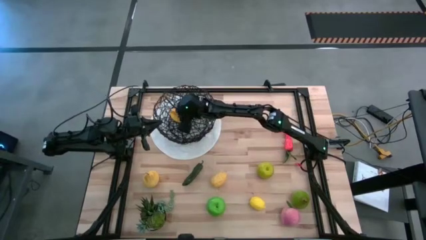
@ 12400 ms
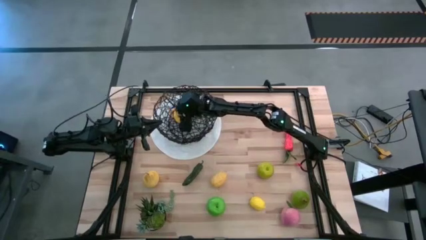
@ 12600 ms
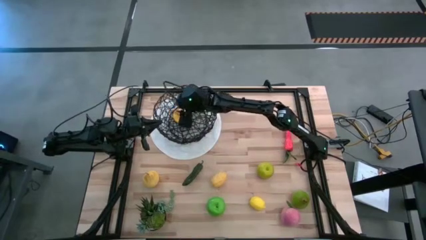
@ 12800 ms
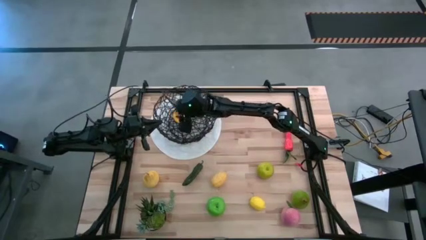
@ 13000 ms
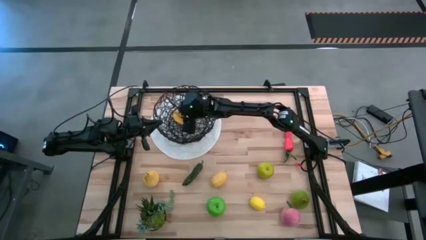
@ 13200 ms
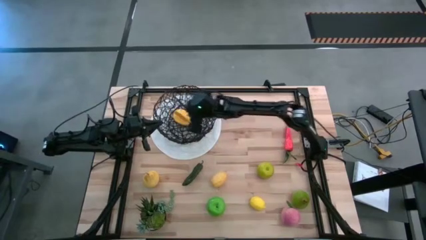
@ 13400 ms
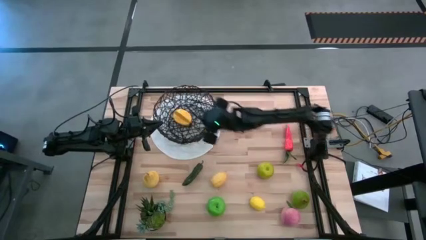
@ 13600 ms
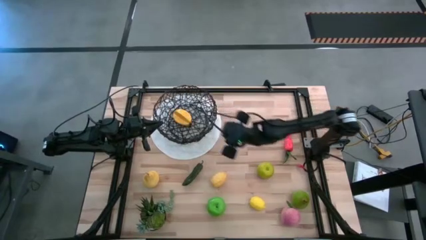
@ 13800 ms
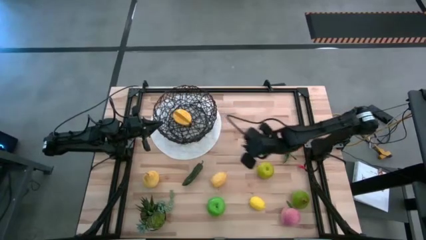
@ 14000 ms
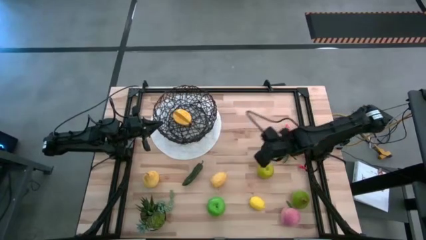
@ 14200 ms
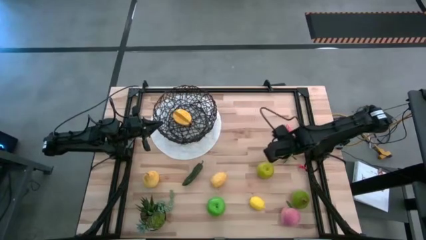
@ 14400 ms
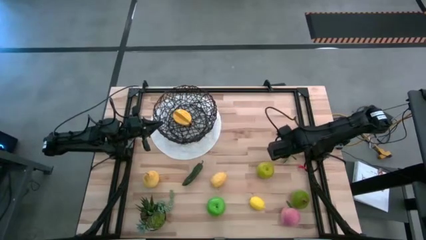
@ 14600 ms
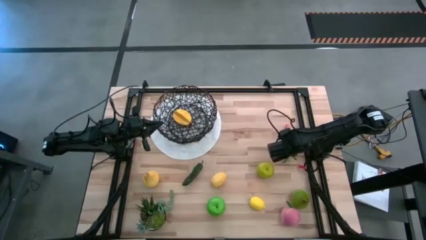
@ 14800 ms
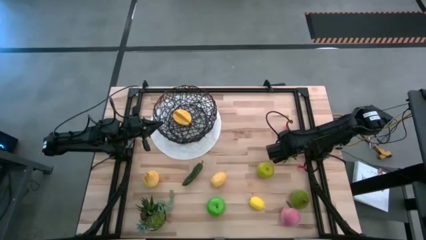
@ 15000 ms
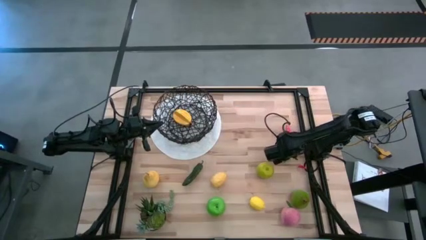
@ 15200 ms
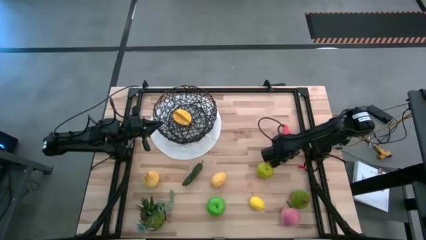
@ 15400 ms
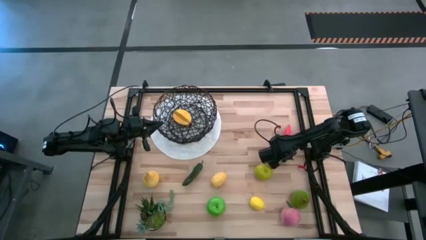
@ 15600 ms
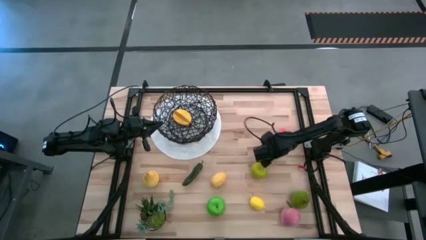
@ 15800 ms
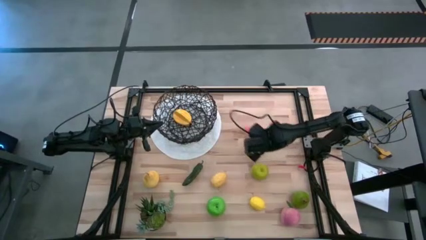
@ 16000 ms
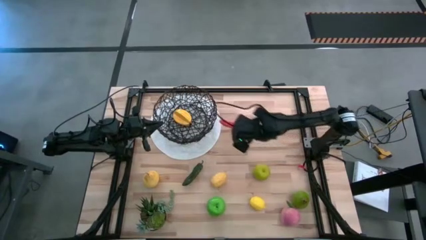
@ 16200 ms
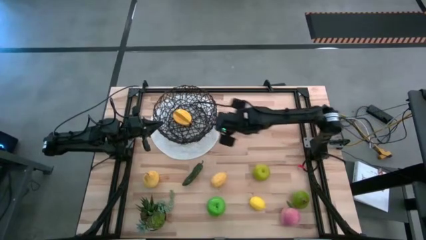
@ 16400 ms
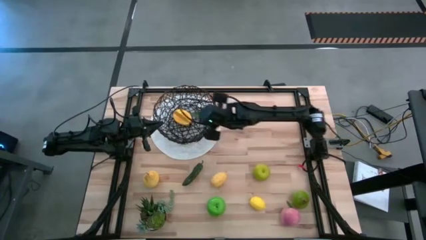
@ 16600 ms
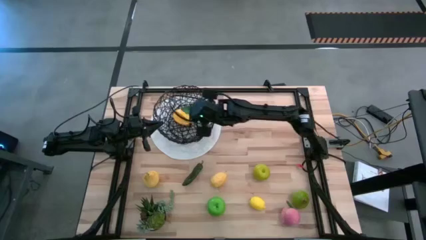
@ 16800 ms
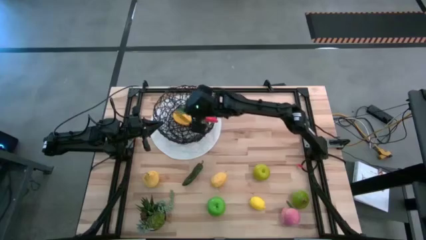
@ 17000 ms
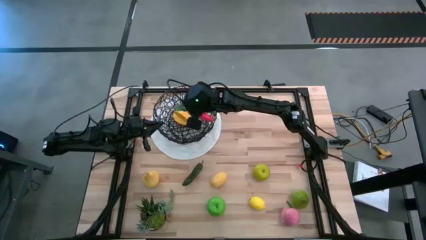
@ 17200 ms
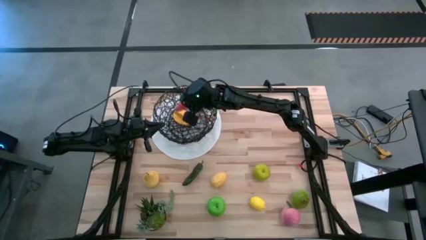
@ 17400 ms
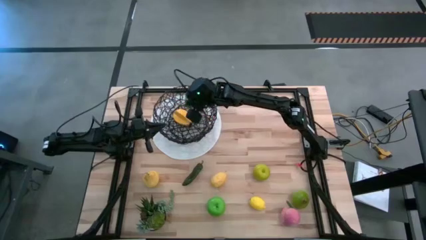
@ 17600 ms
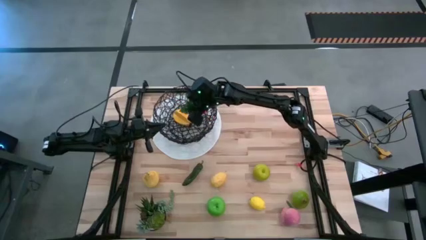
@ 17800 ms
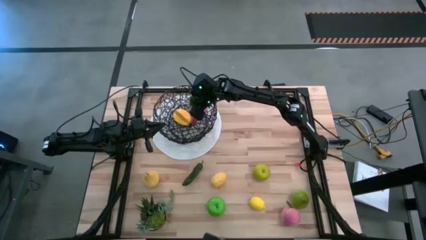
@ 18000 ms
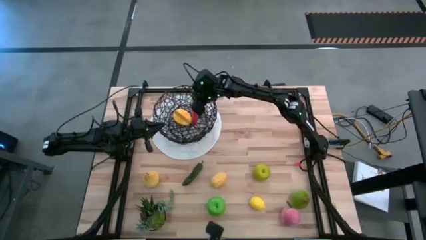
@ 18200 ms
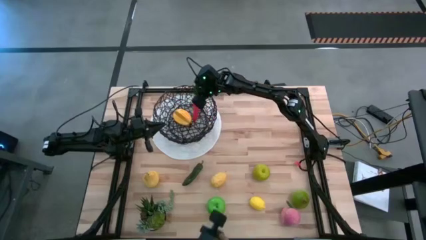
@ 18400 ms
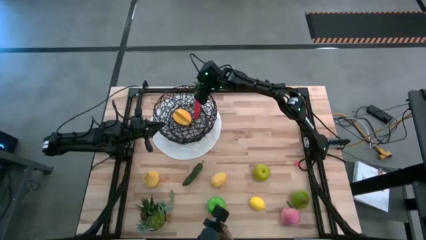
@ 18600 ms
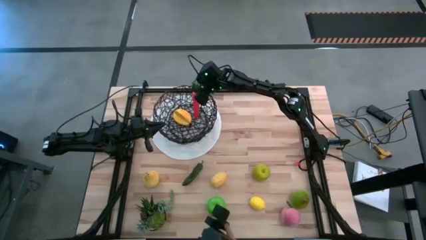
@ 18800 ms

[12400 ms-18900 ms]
Task: Build produce basket
Put the carrot into the wire basket

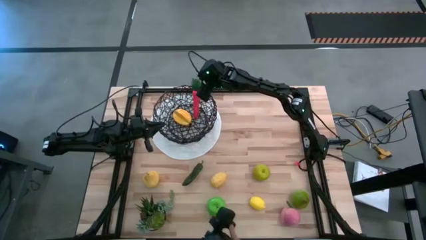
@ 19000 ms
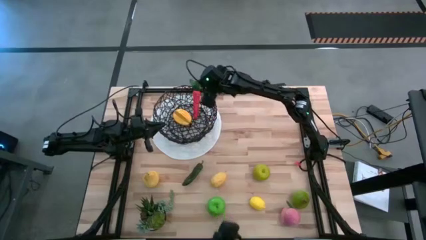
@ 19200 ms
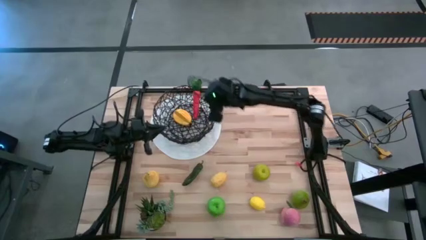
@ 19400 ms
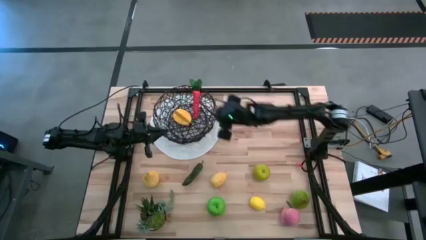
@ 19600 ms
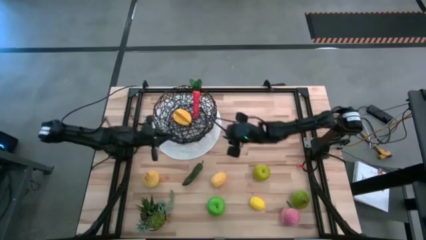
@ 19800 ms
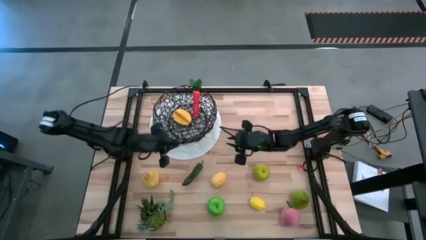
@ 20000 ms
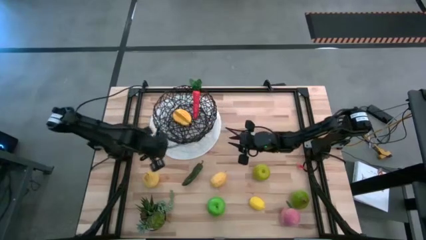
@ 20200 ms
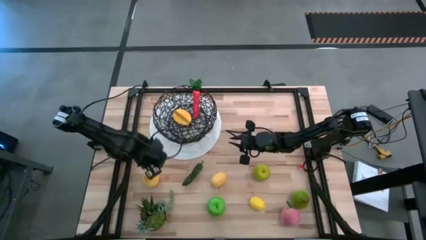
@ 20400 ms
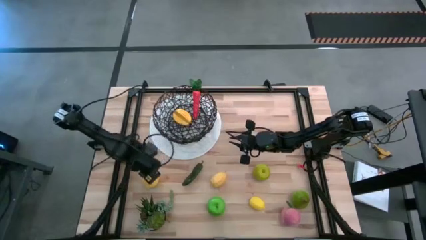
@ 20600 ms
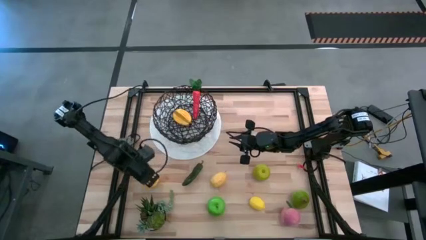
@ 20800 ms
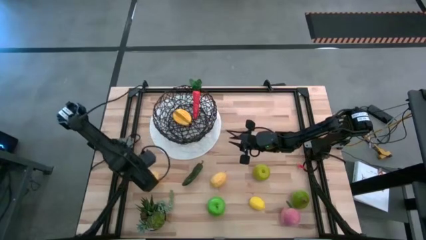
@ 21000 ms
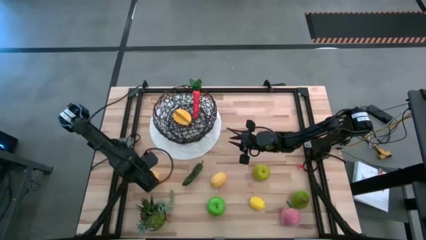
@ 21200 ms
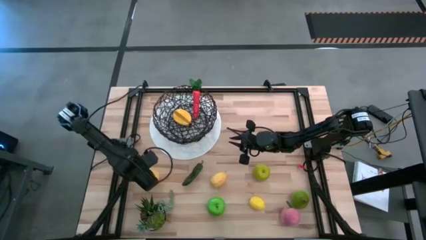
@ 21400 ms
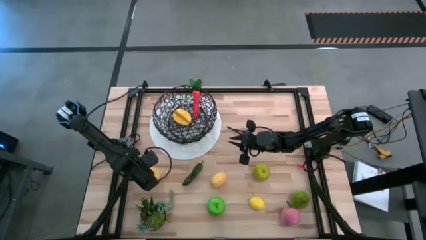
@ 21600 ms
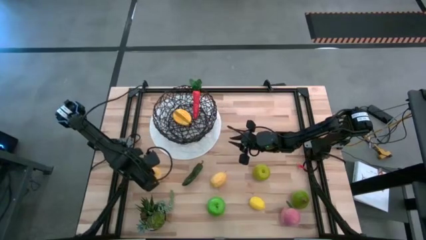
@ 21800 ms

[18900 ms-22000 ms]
Put the yellow pear into the wire basket

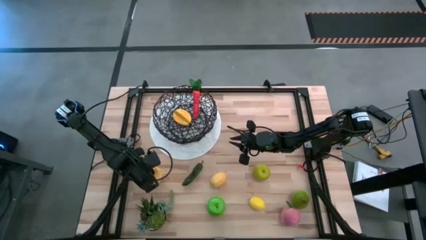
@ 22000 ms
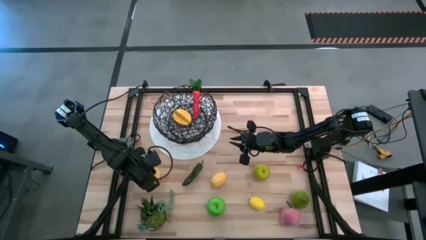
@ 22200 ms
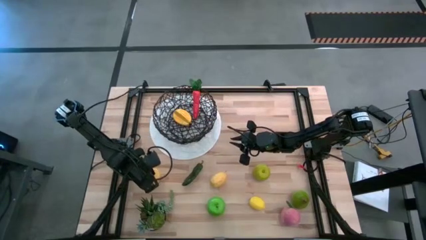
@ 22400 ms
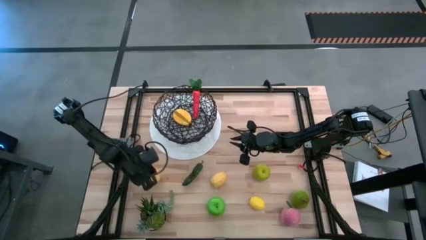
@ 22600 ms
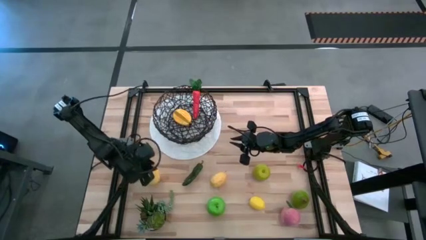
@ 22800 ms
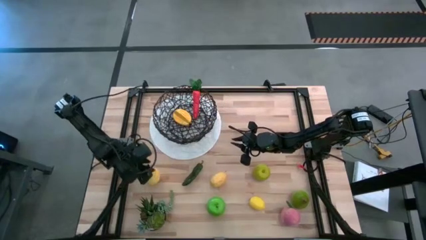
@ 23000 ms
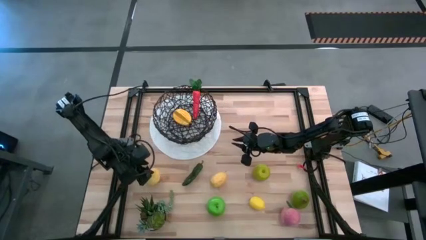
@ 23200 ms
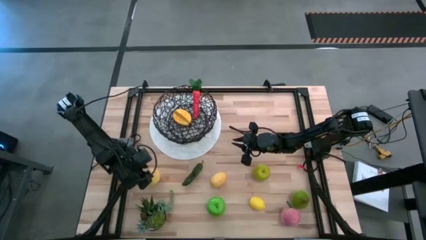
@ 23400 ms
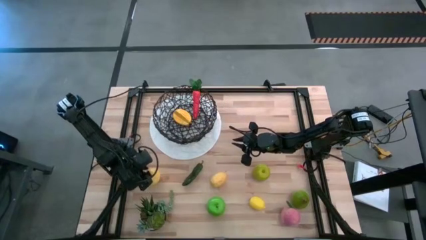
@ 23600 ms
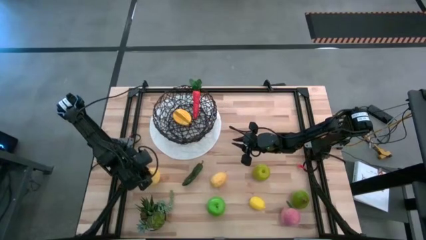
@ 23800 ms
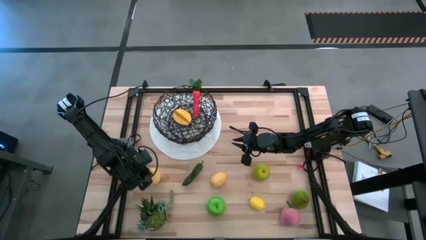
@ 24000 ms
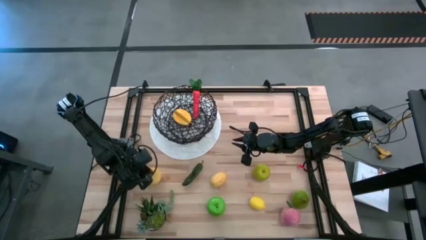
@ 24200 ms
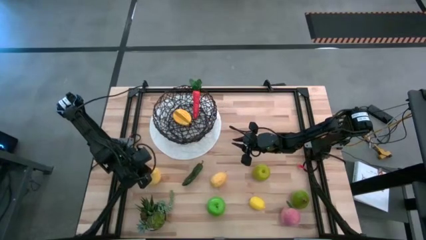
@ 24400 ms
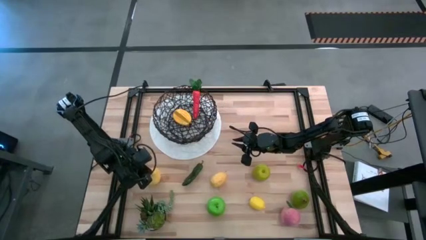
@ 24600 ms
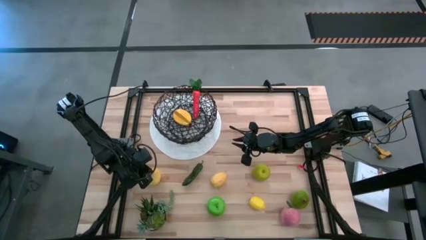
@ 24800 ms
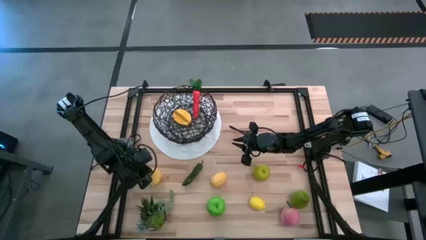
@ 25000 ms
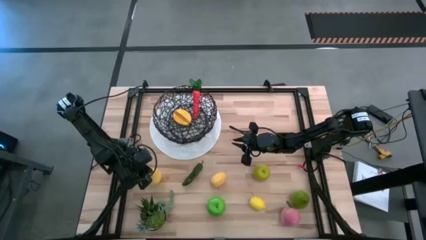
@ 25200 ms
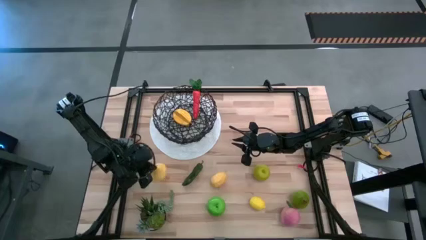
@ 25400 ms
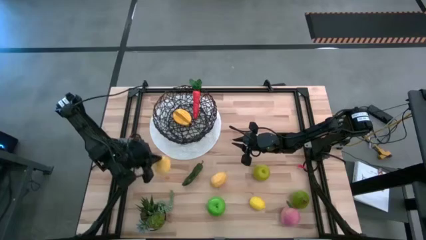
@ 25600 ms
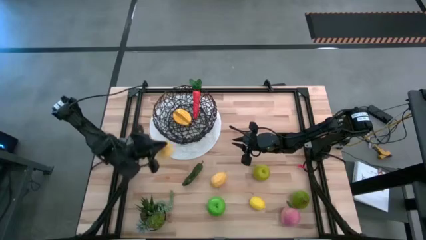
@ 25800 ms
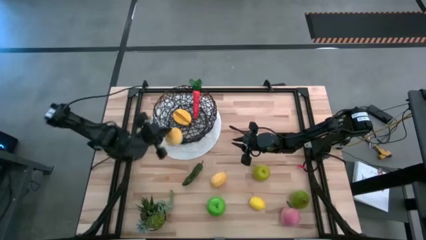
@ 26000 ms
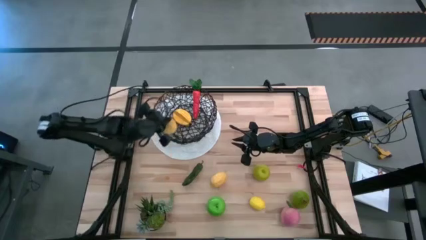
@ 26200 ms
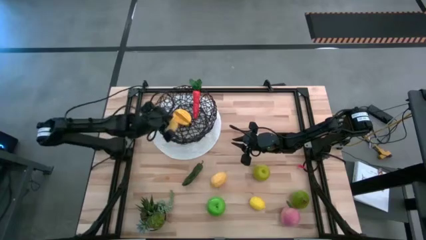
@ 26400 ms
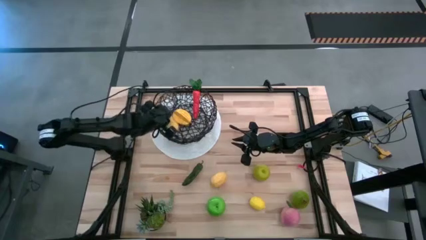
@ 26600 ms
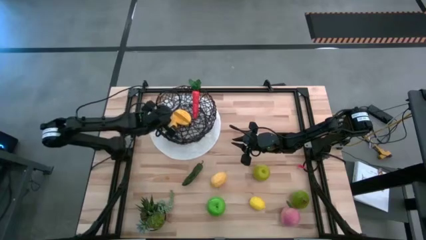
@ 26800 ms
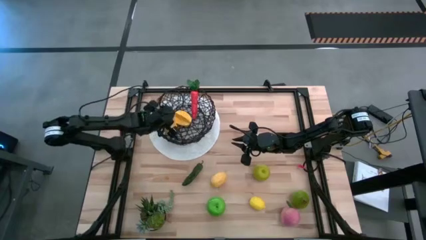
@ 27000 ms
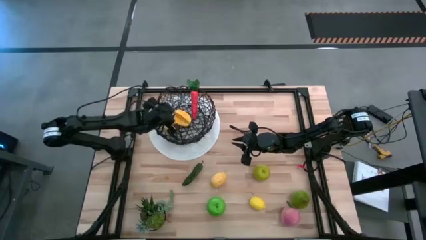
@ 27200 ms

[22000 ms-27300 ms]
Put the yellow pear into the wire basket

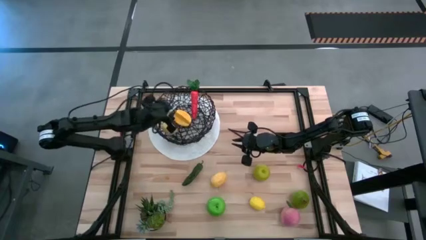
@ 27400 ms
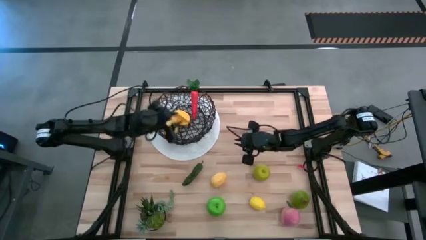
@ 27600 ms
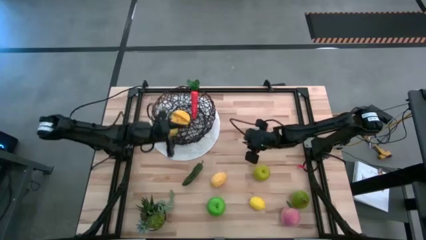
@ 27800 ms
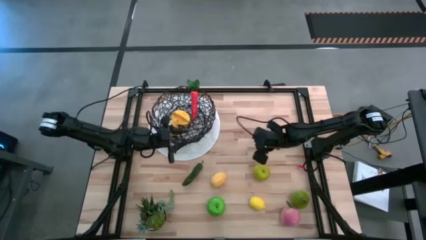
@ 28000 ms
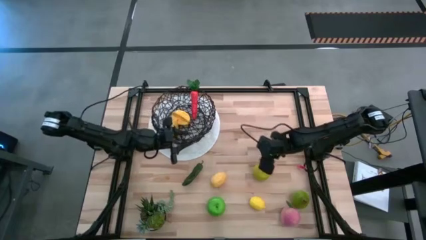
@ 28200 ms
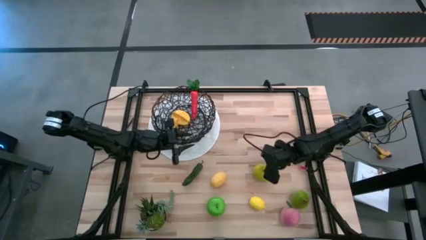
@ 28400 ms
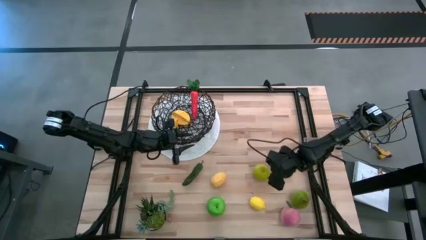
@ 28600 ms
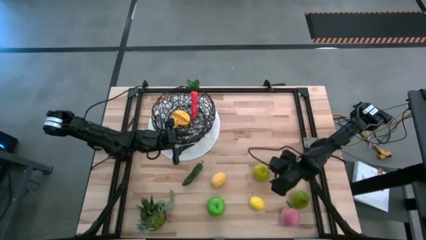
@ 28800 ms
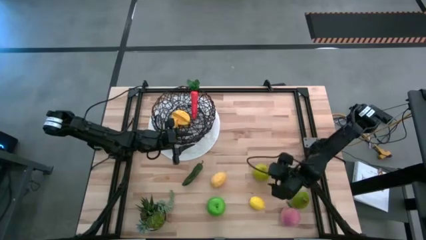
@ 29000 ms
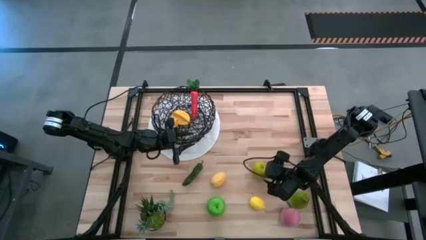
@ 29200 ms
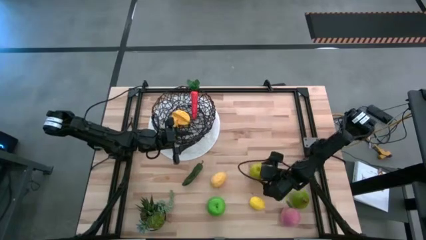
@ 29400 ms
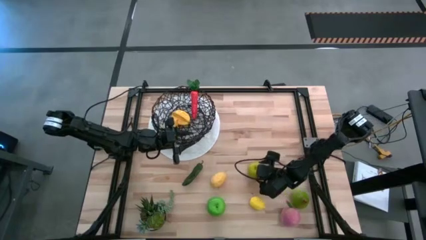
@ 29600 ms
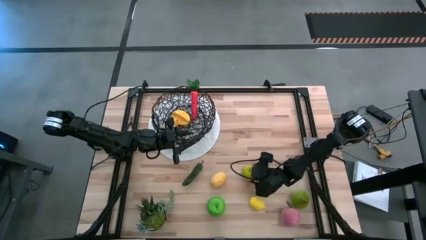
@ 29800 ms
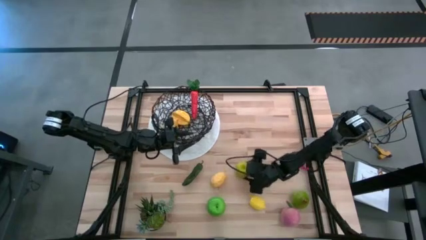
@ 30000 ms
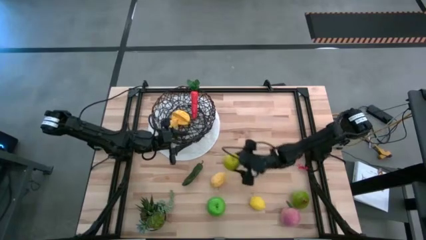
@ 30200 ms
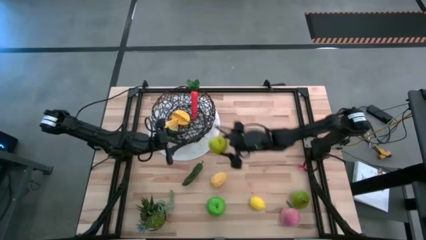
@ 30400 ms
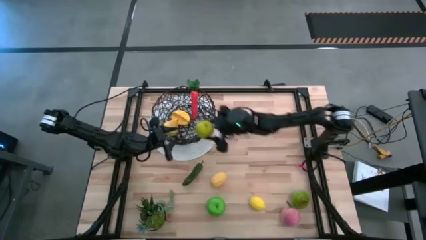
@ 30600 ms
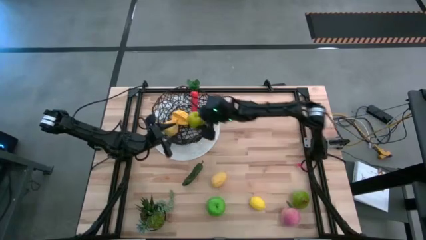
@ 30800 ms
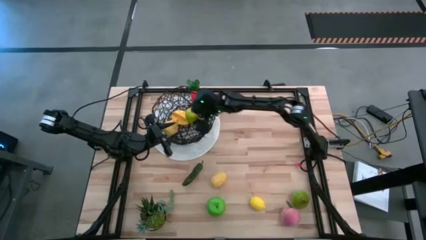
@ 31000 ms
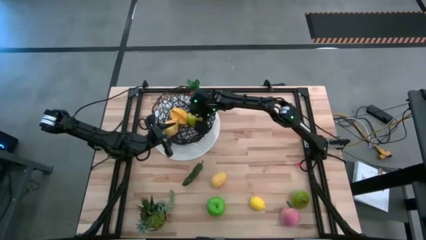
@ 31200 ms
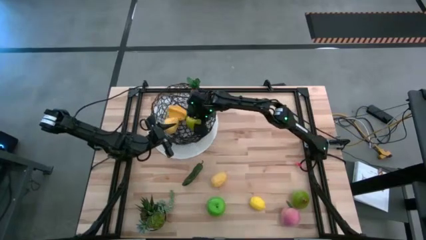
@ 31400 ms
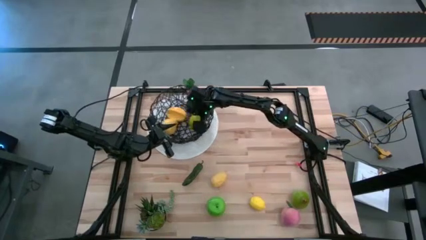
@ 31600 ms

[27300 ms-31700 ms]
Put the right green apple into the wire basket
